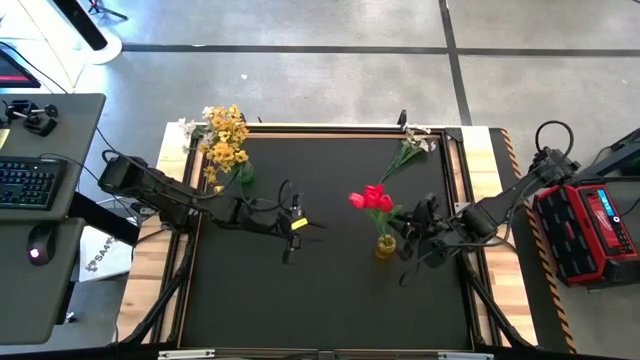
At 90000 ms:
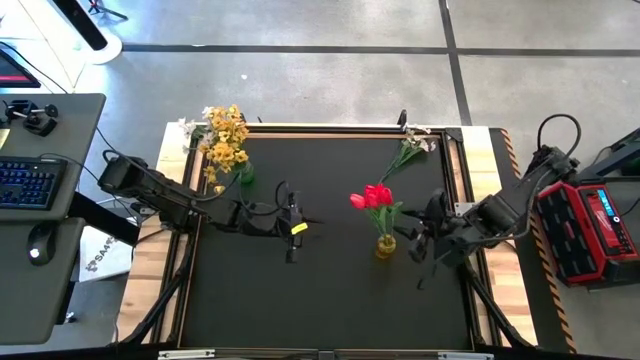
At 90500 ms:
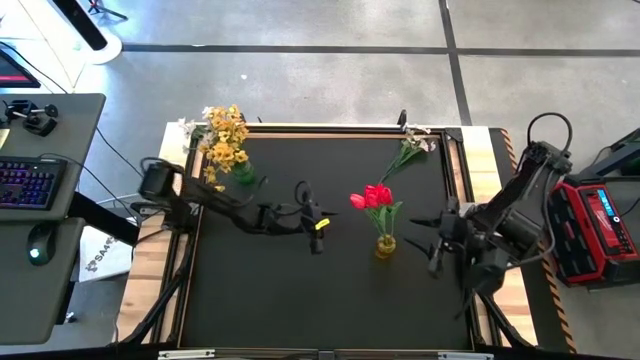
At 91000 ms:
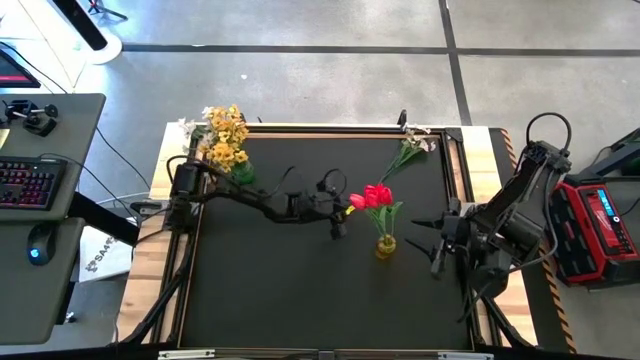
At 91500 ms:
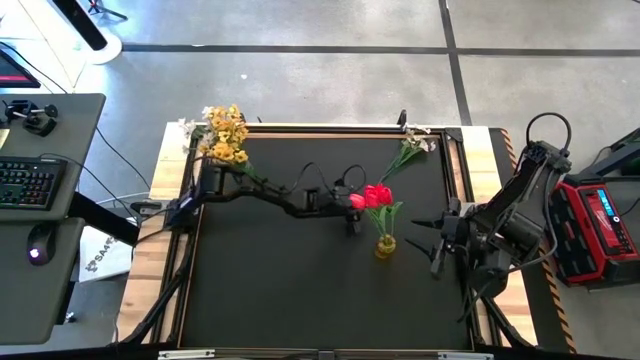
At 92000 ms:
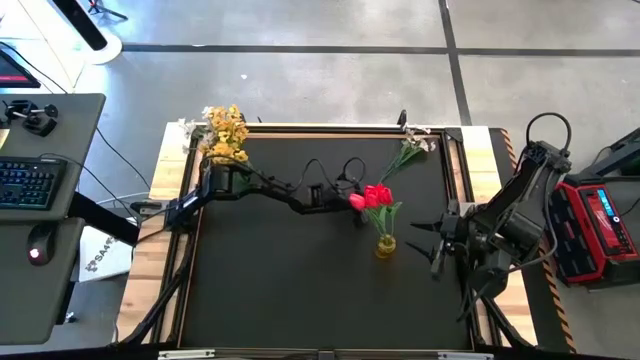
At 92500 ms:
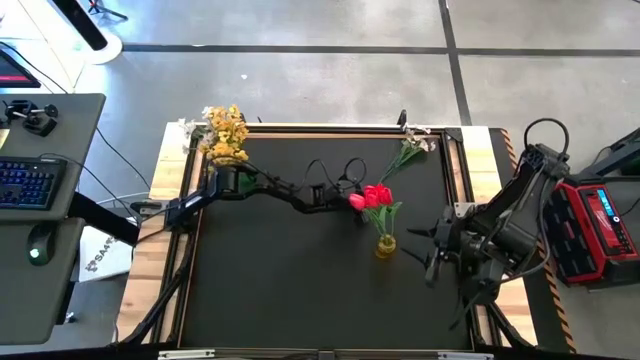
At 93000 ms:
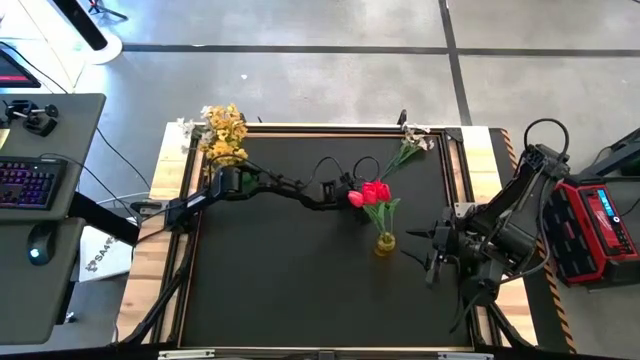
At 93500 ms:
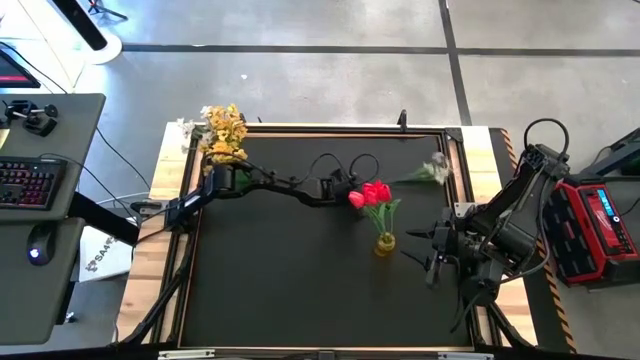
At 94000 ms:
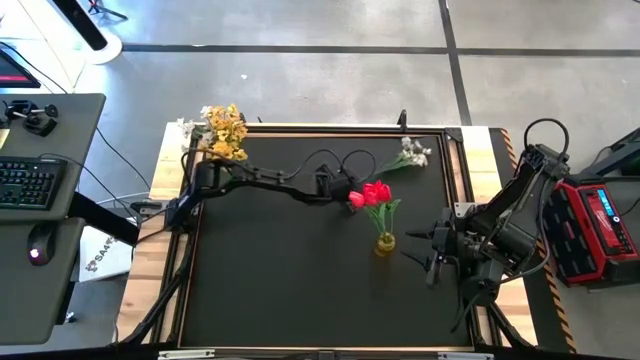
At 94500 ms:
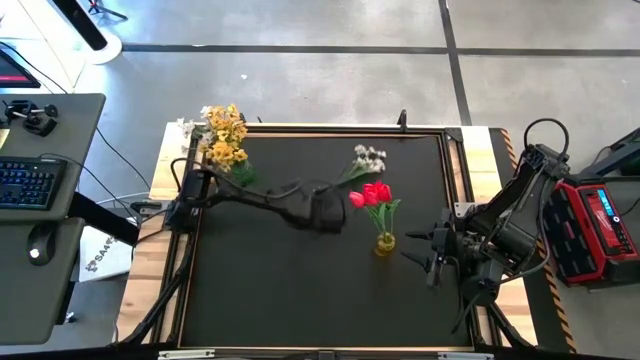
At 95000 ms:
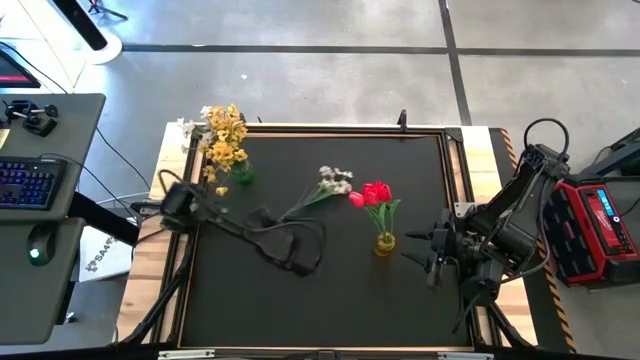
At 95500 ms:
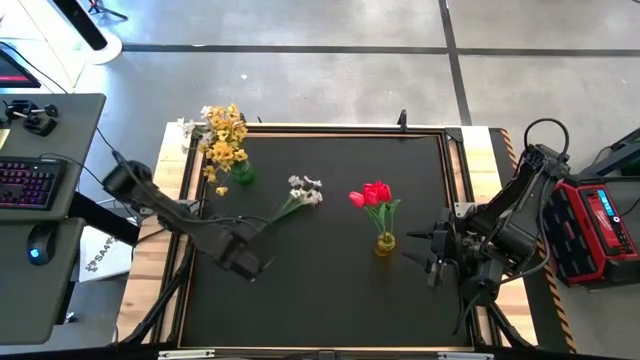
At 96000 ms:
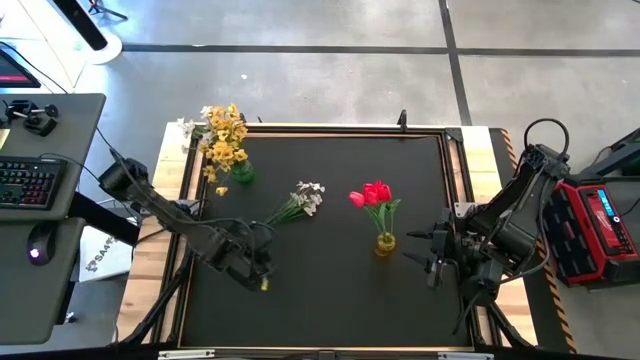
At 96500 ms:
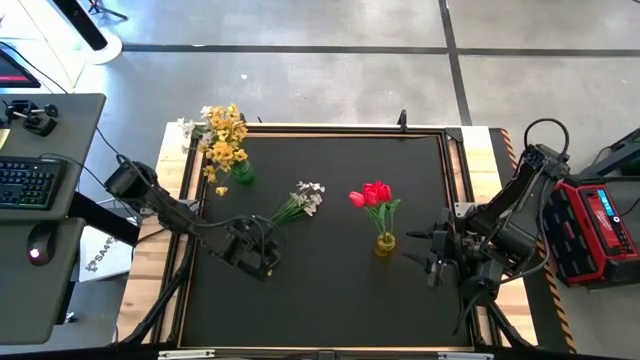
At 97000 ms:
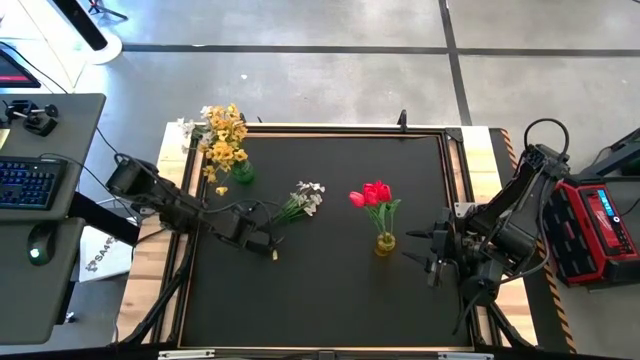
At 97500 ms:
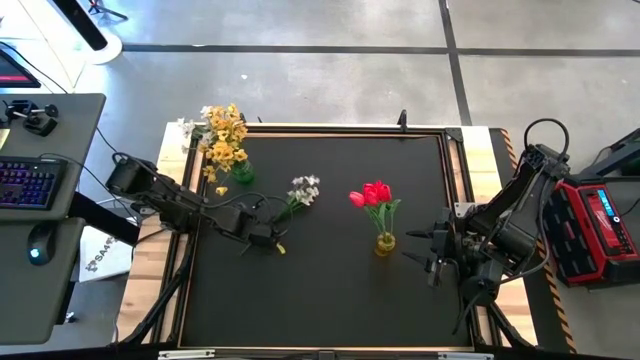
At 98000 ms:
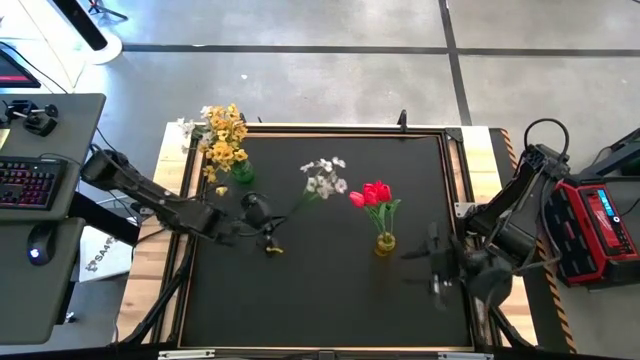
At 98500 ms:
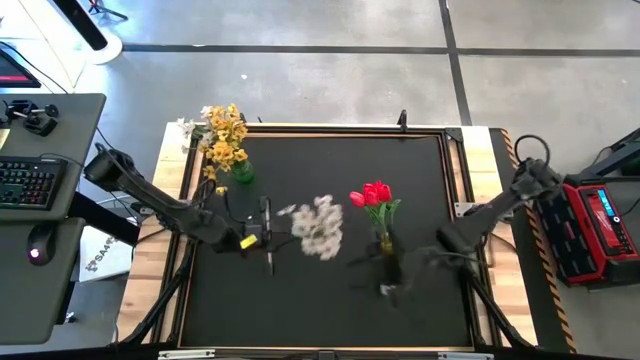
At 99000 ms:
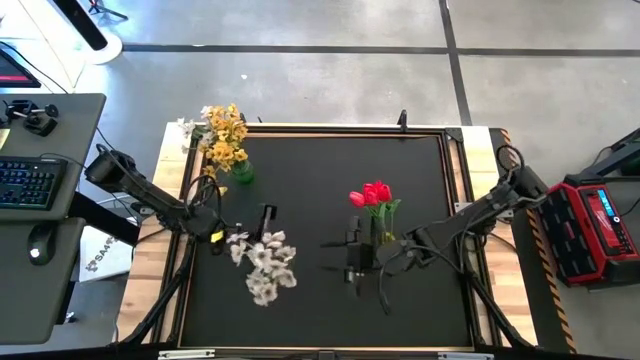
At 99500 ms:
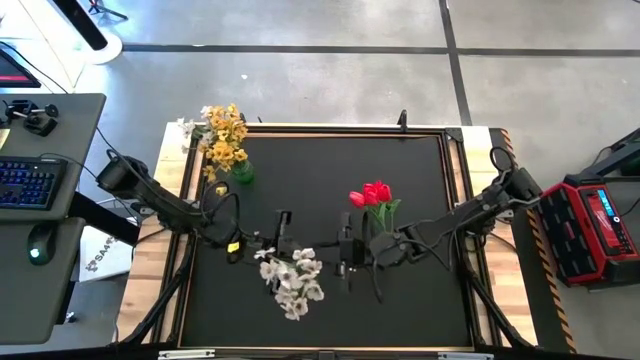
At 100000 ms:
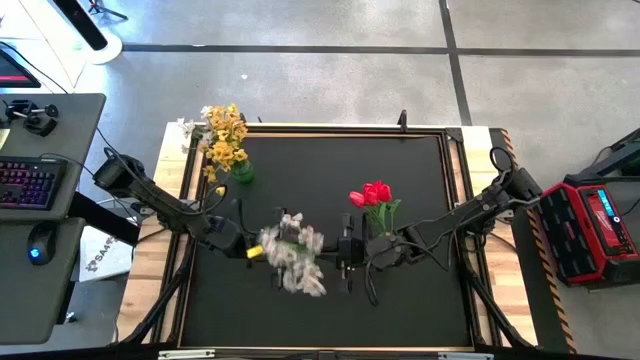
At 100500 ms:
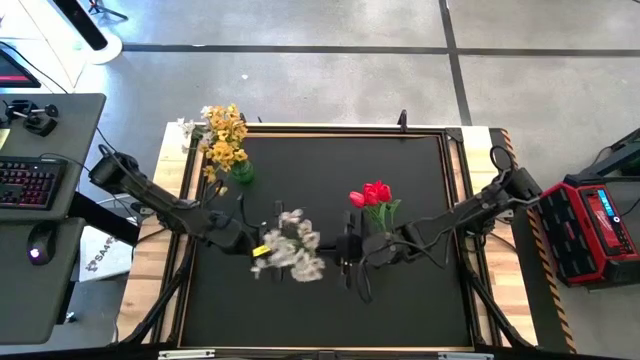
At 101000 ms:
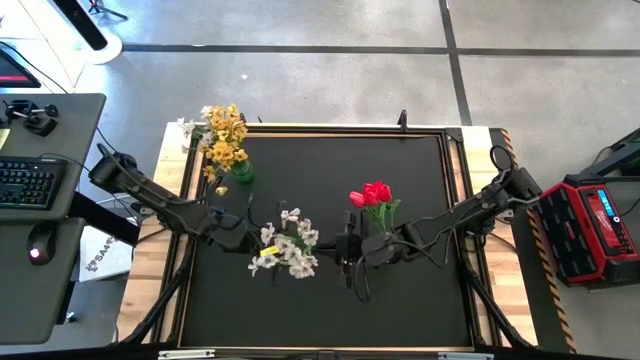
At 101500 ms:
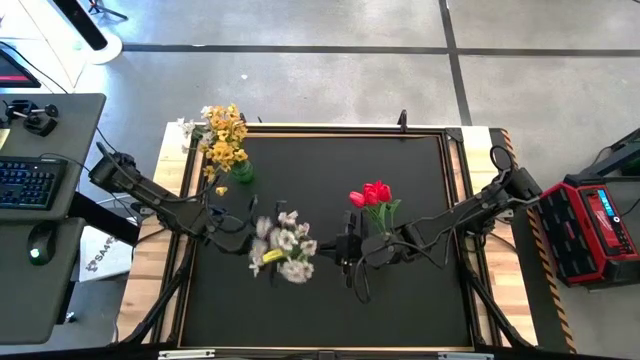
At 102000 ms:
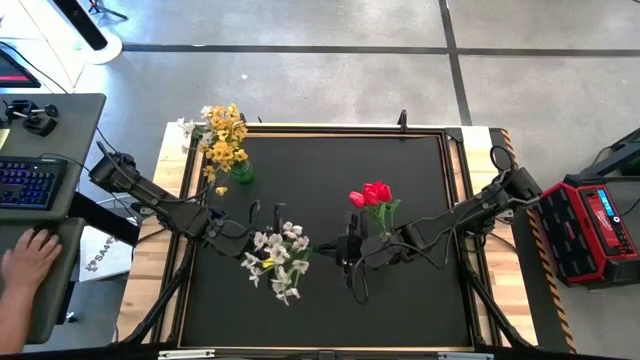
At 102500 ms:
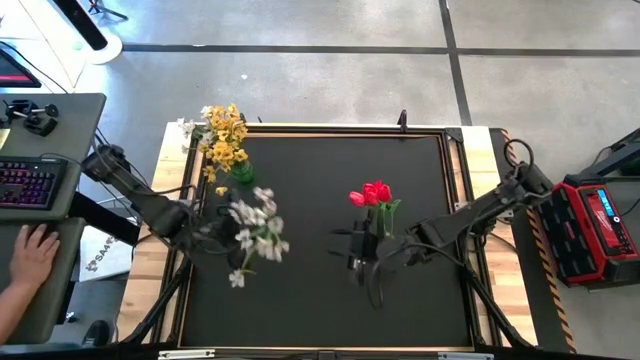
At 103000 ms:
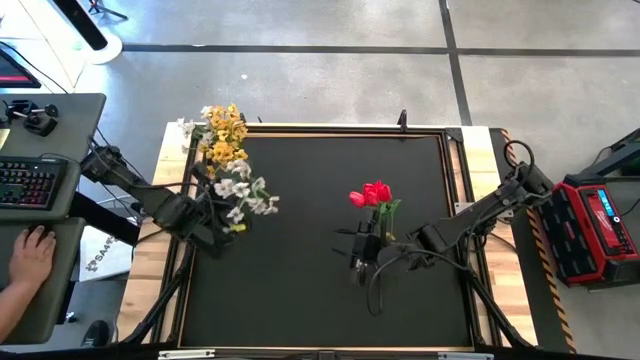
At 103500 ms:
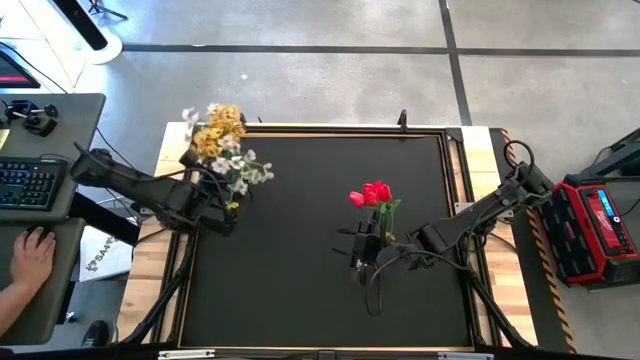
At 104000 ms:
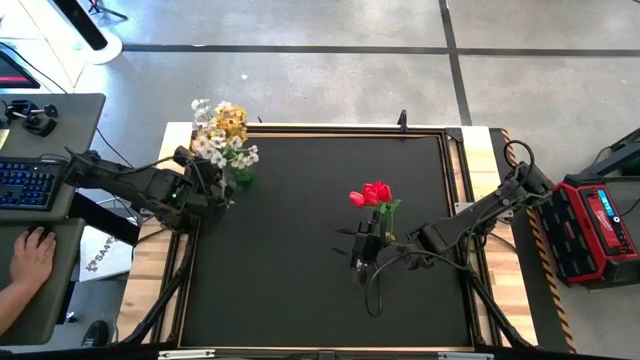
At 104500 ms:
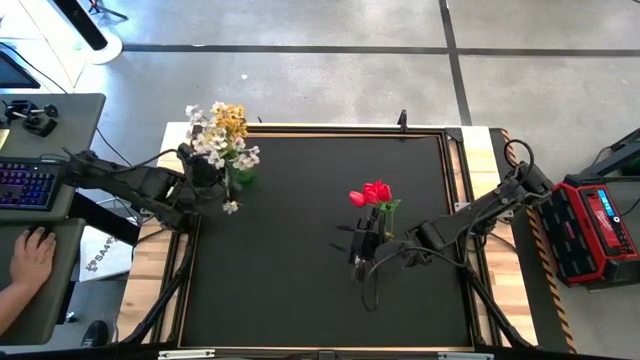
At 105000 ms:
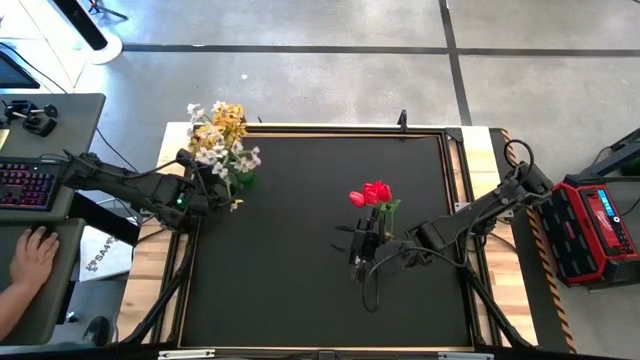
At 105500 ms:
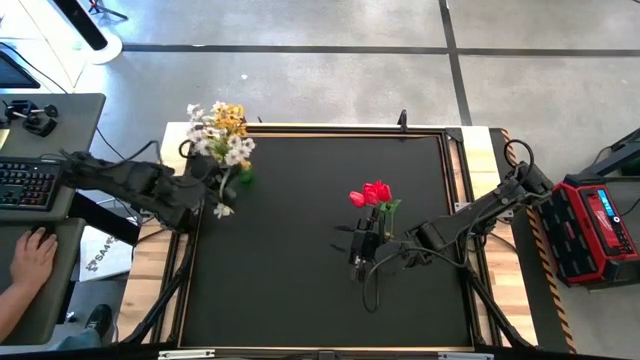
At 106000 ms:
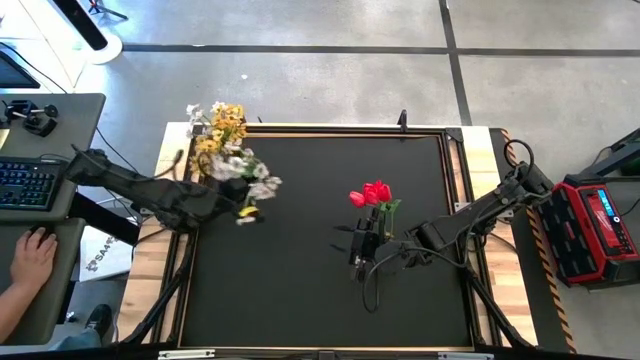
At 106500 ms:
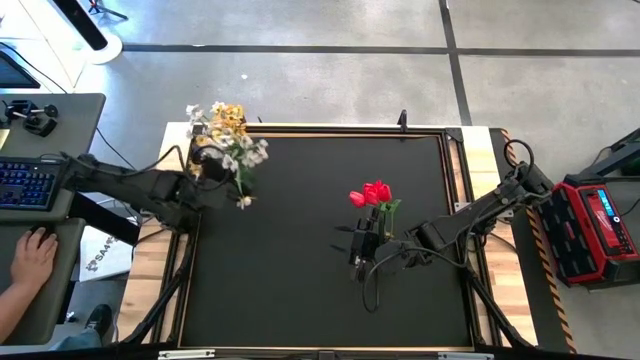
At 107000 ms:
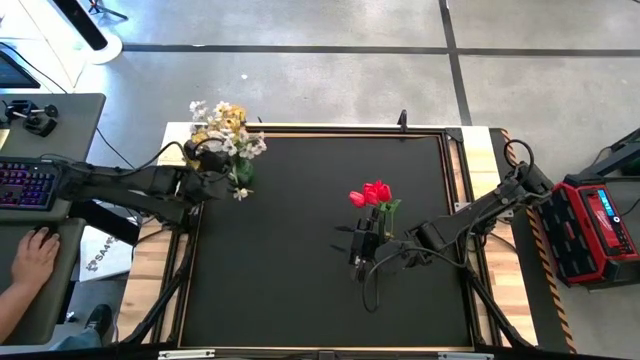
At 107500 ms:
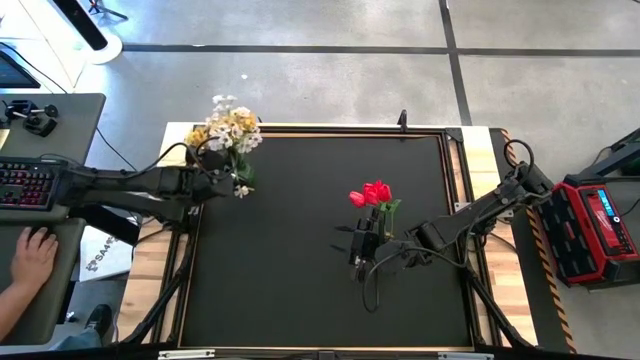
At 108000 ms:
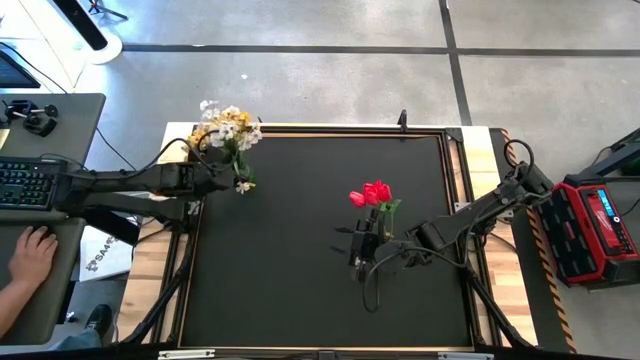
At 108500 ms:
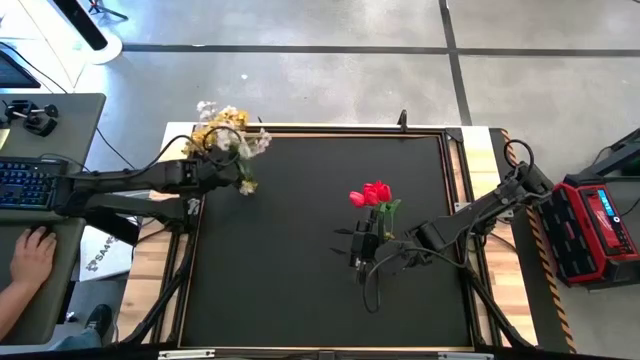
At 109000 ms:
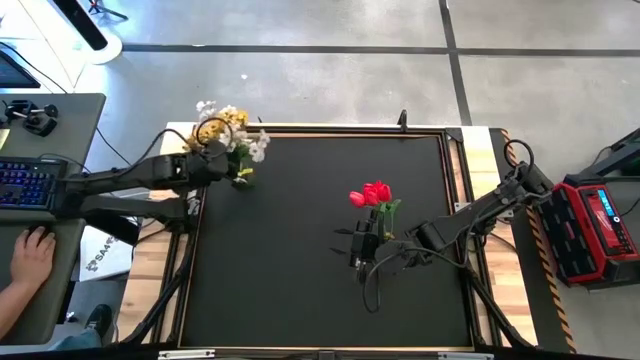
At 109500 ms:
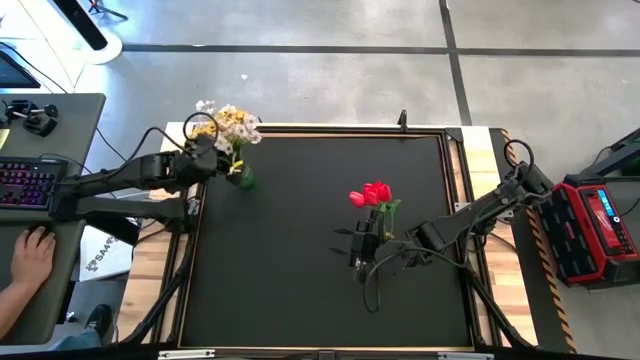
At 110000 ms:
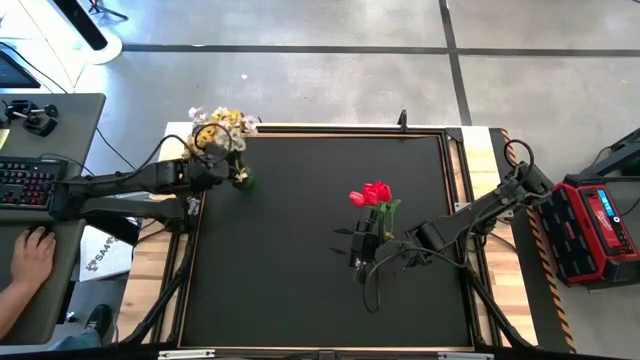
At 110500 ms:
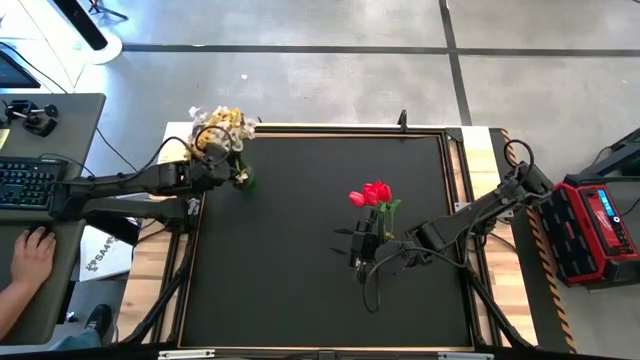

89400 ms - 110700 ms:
Task: Sort flowers into vase by color
Put the white clustered flowers into the green flower vase

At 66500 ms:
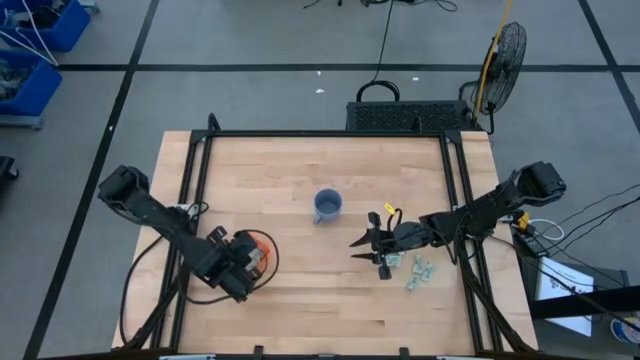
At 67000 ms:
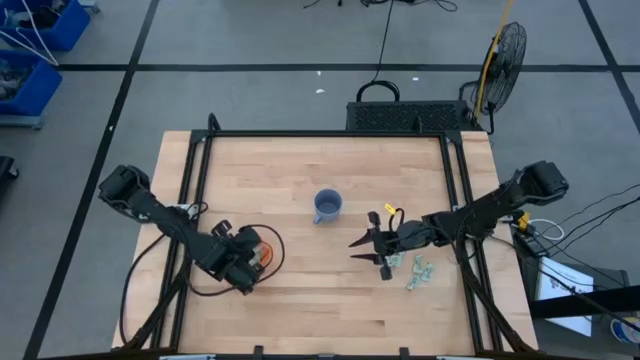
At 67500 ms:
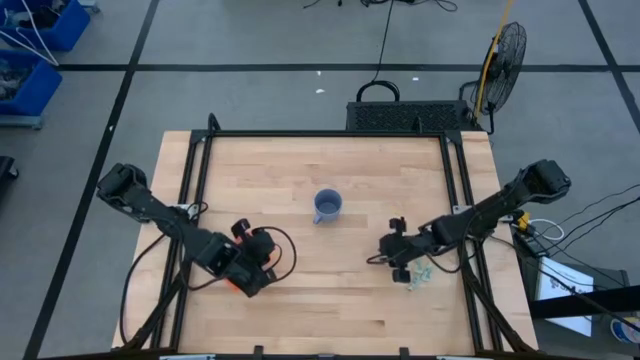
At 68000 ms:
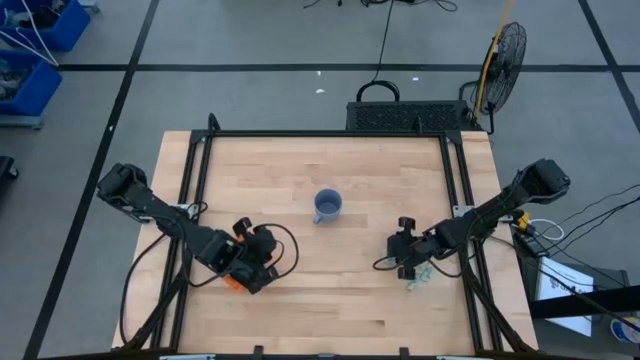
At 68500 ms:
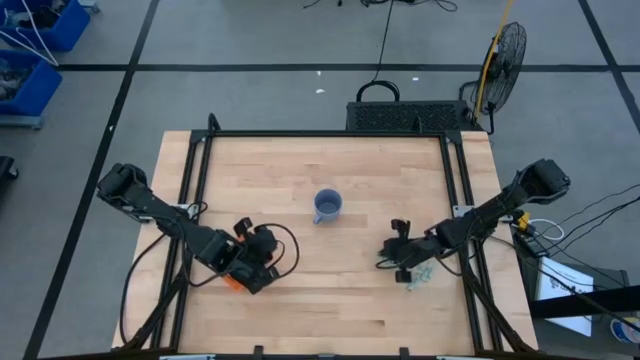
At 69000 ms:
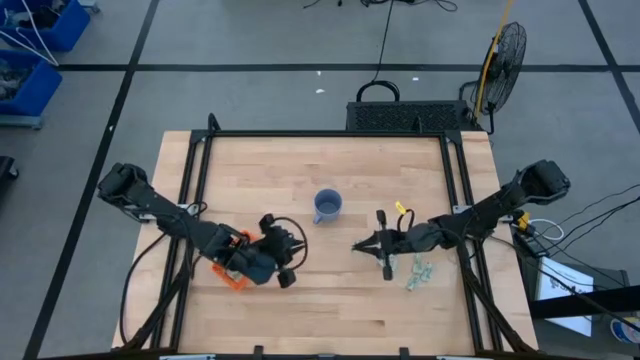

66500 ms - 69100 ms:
Task: Pick and place Stevia / Truvia into bins
Put the green stevia packet into the orange basket
